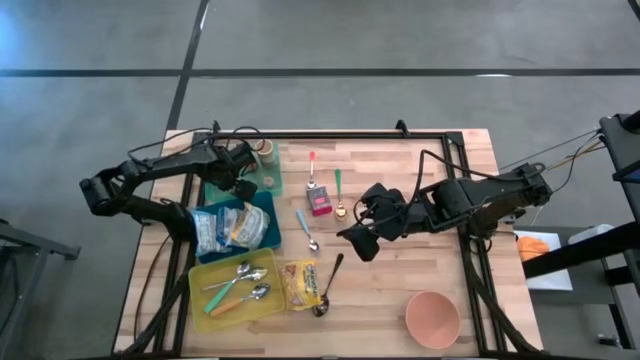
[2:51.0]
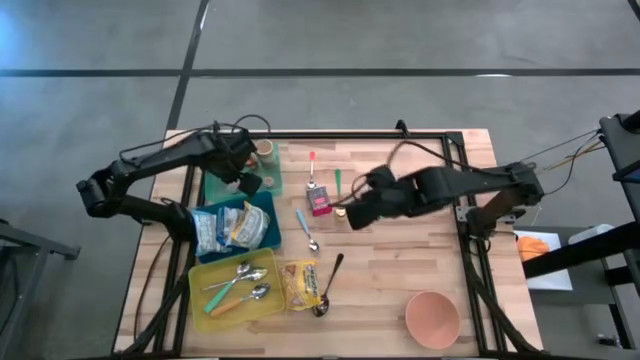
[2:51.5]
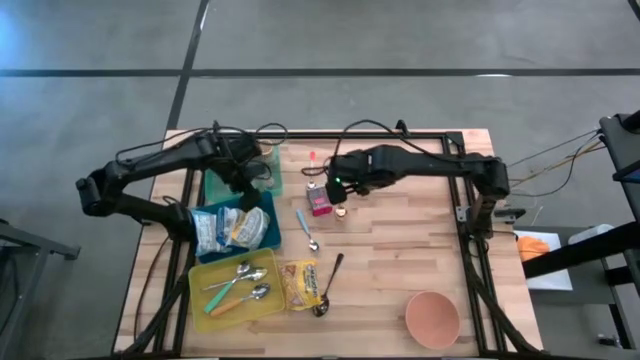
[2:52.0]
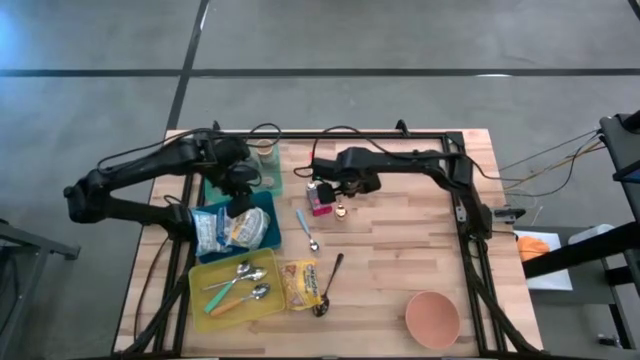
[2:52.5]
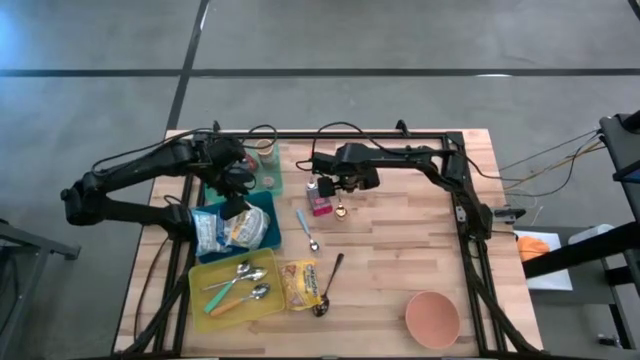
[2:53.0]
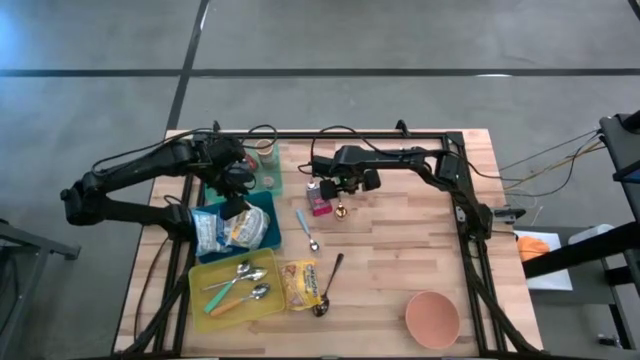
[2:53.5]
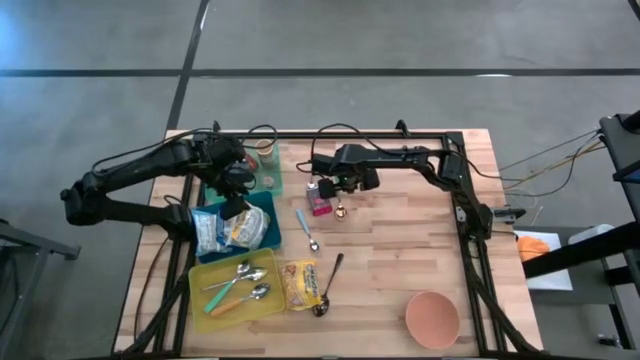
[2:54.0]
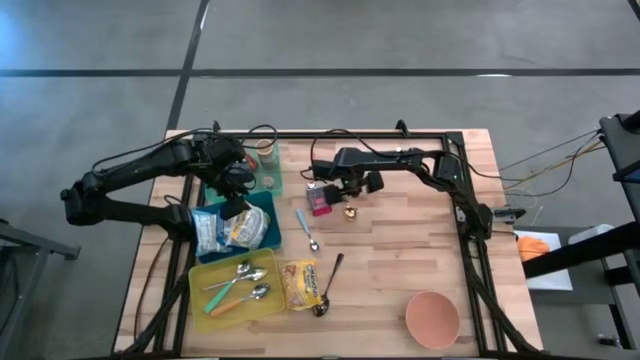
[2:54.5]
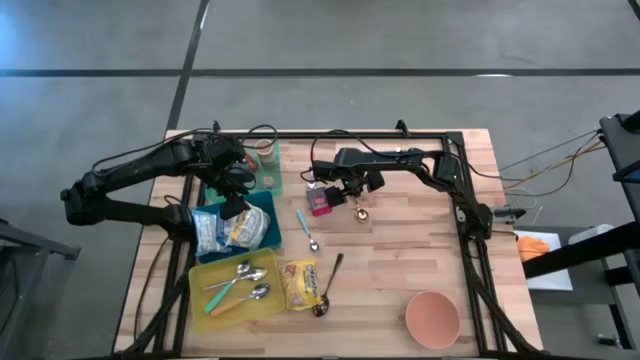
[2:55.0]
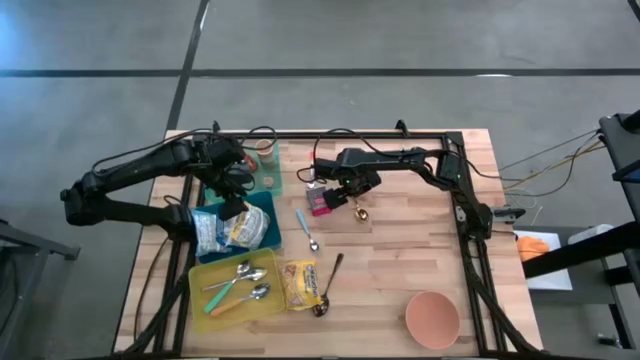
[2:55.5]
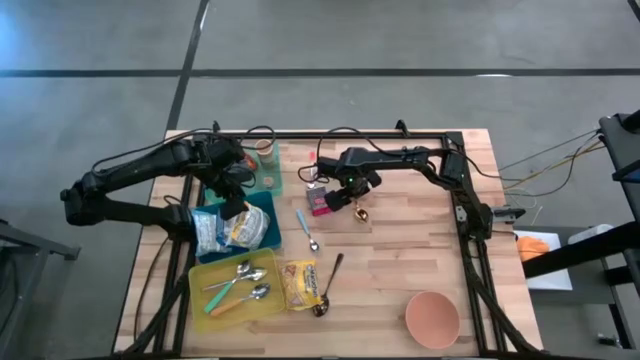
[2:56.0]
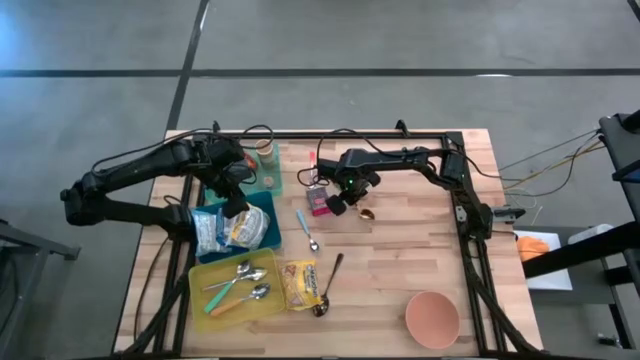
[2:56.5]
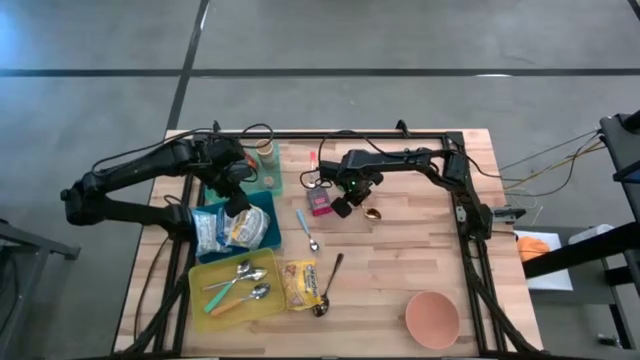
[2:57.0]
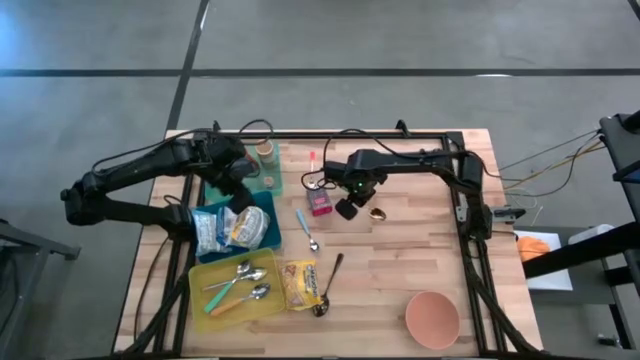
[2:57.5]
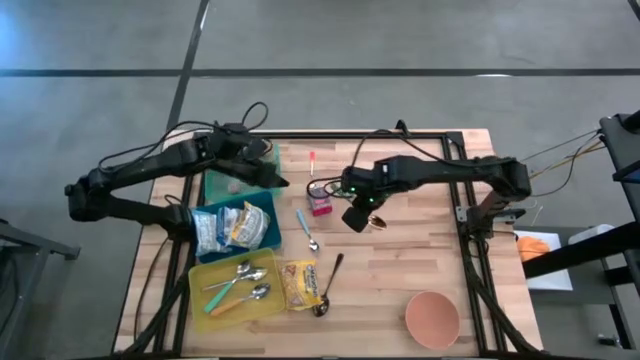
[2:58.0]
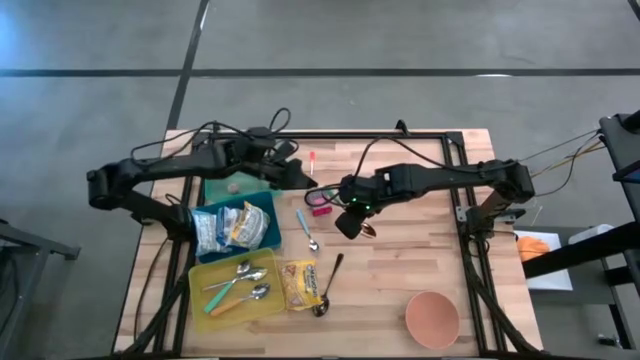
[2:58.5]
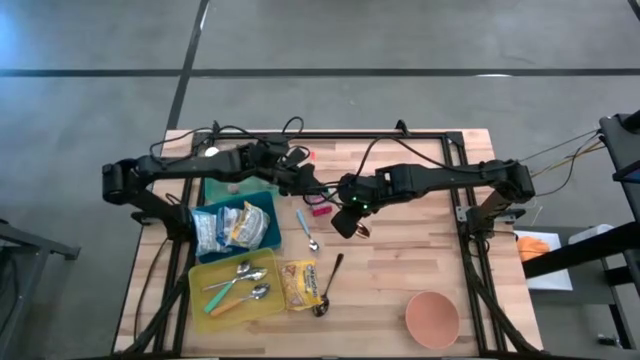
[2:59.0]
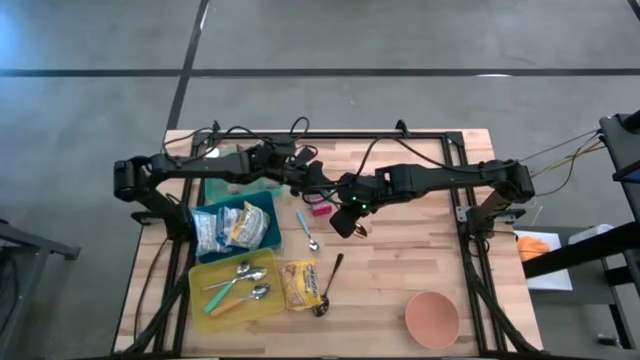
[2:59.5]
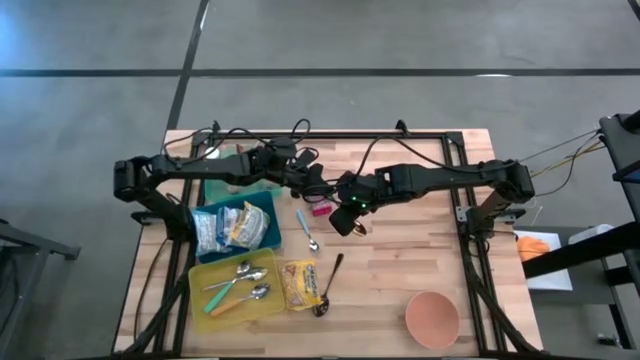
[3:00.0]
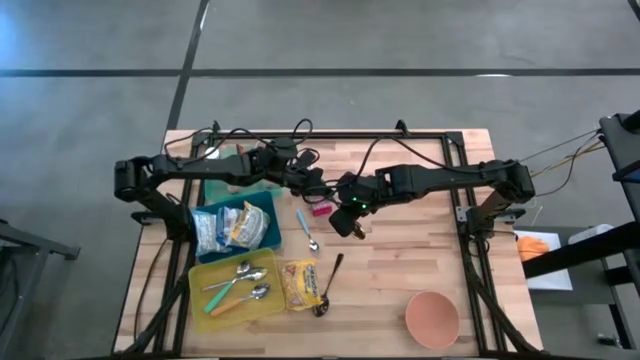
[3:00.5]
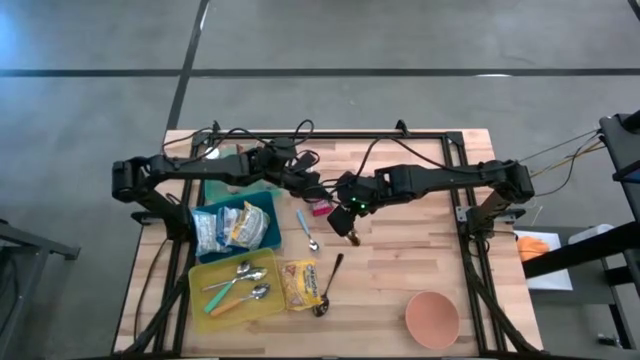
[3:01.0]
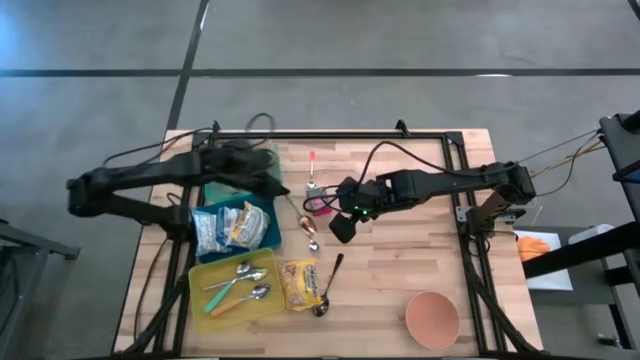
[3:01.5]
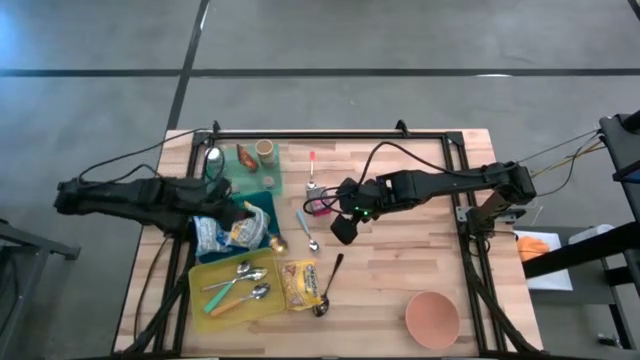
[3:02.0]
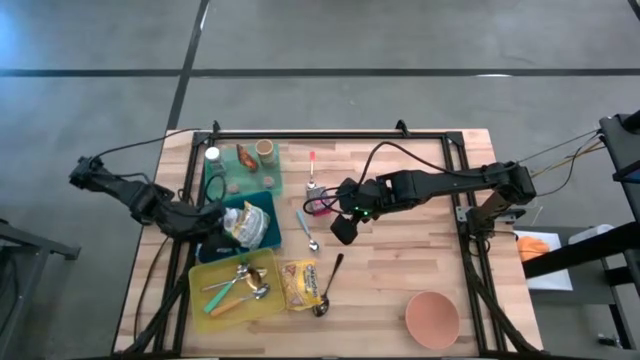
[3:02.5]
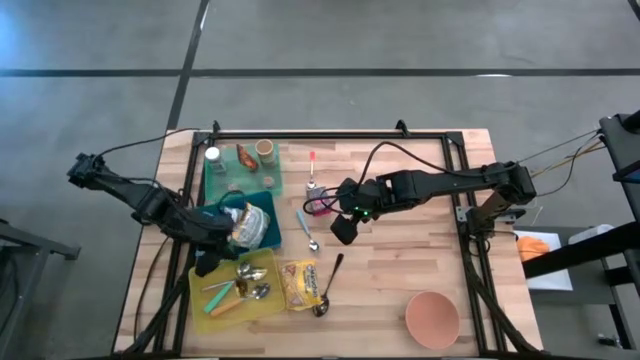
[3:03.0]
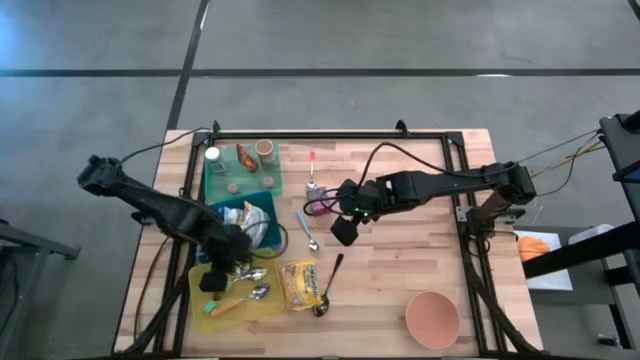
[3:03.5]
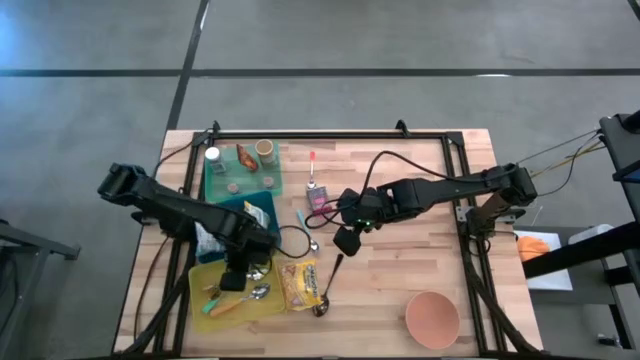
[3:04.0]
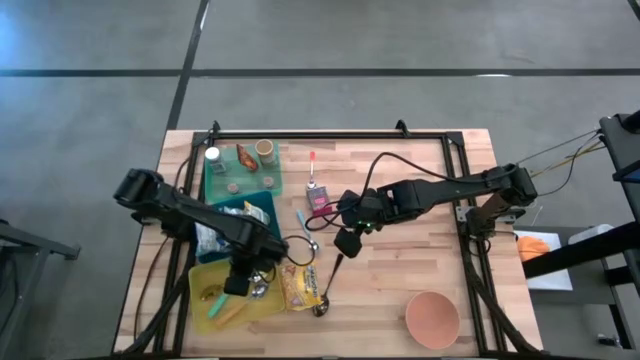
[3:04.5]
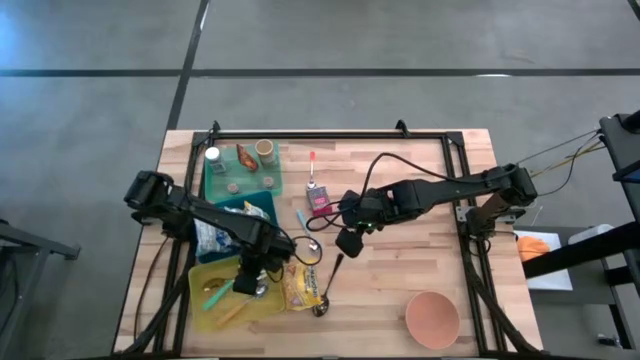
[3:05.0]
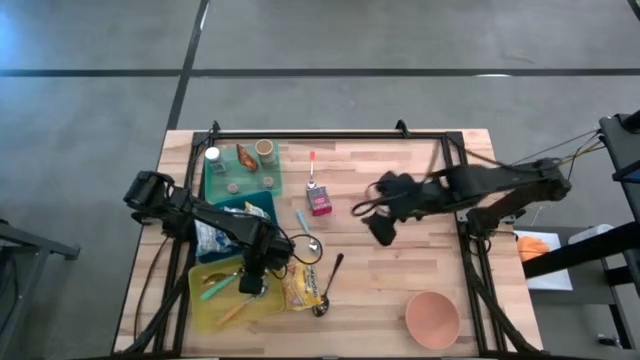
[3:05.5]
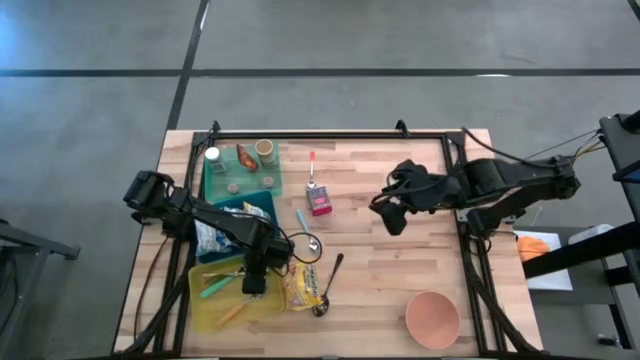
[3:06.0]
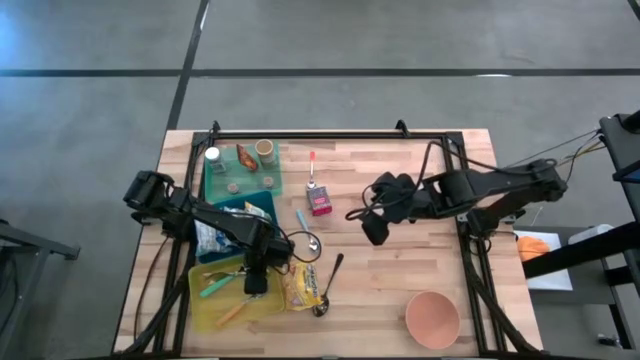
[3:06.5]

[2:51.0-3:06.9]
Put the green spoon into the yellow bin
